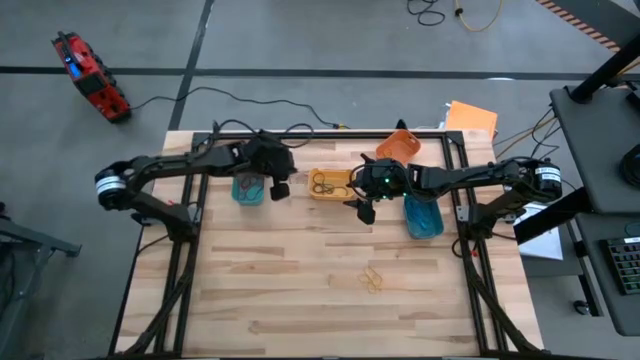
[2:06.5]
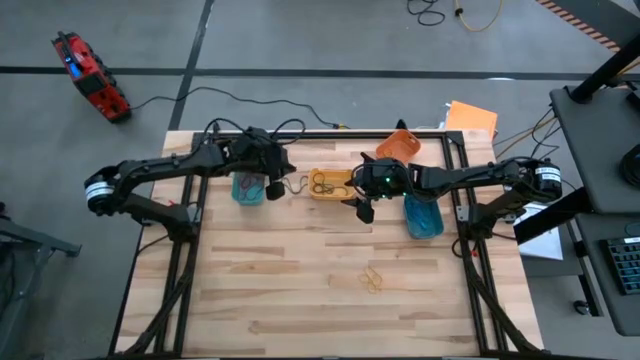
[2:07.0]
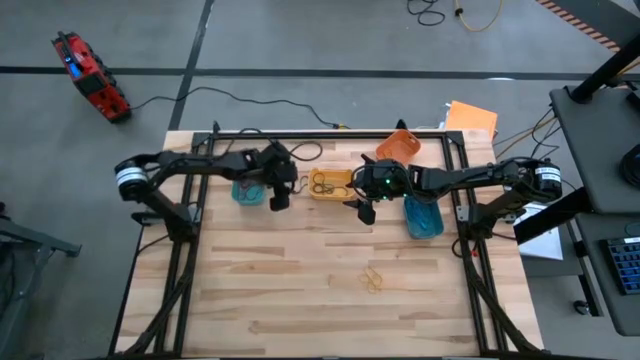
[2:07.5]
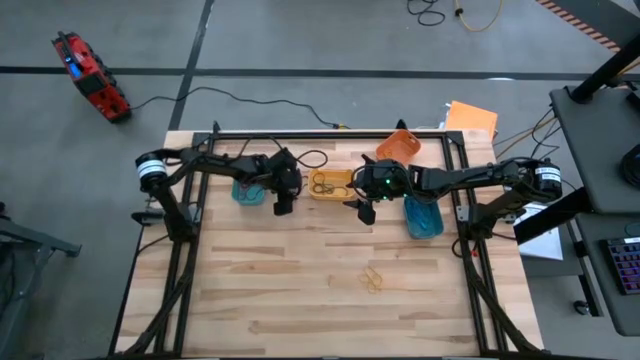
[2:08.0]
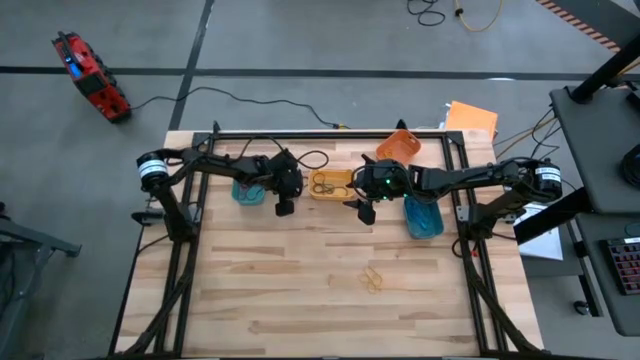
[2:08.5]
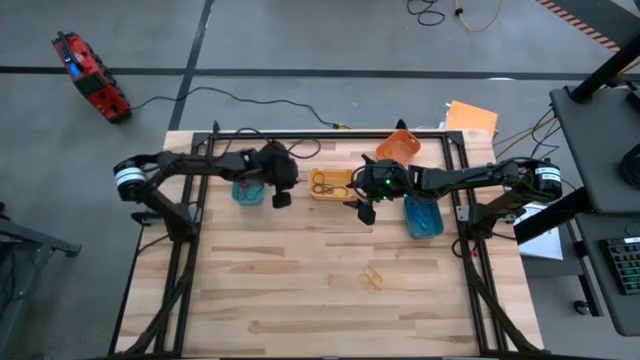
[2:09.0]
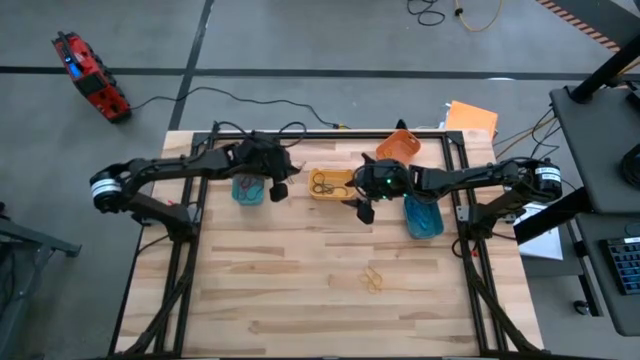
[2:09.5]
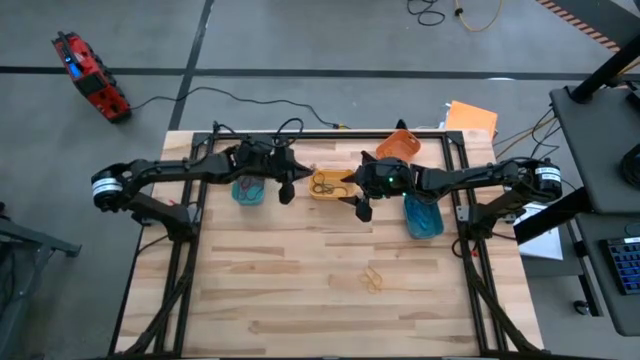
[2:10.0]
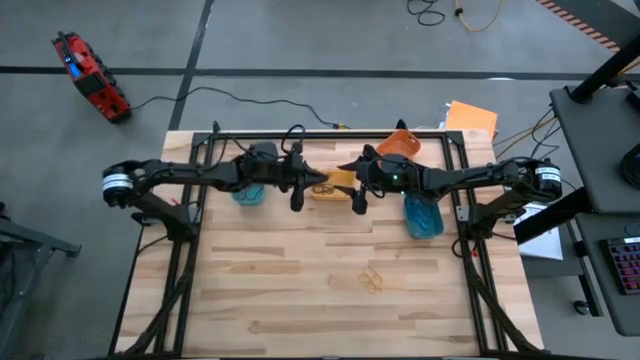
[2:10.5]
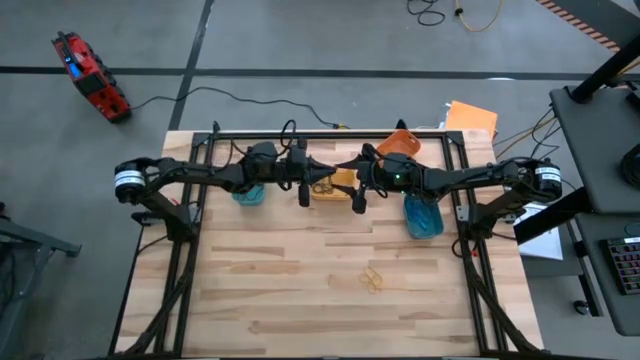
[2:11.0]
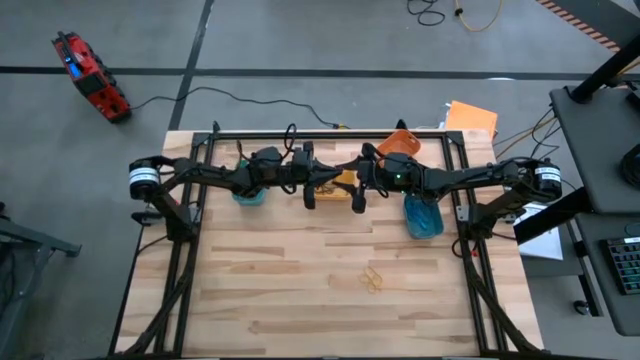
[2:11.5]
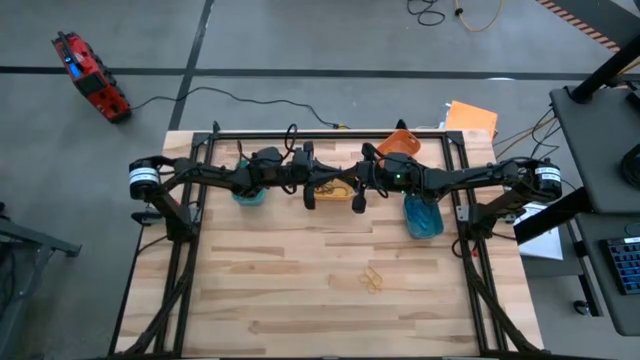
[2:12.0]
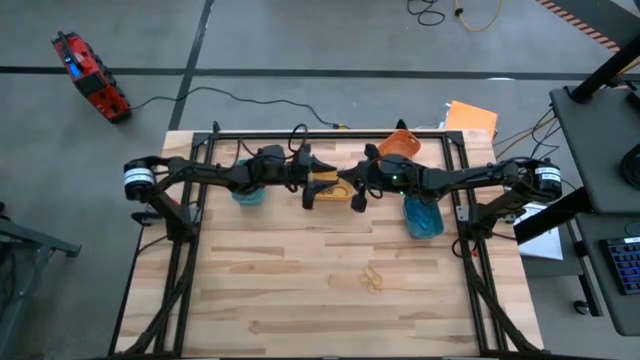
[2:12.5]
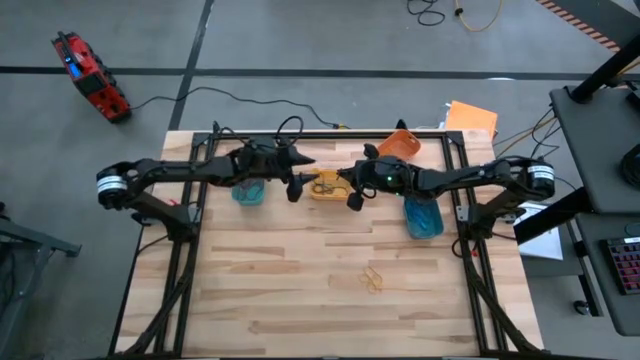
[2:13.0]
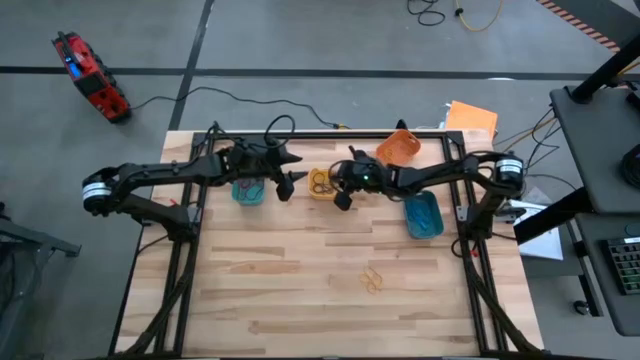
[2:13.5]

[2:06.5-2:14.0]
Task: Sort rubber bands into baskets
Put the black rubberband into the yellow bin

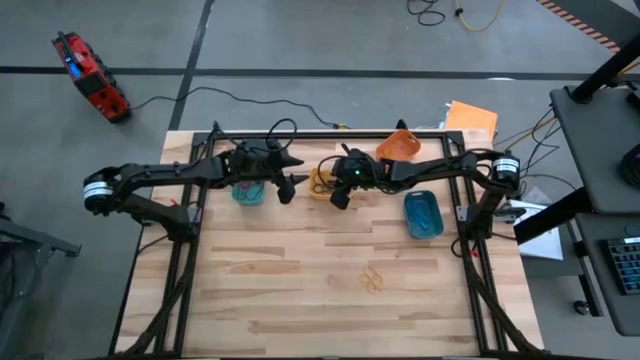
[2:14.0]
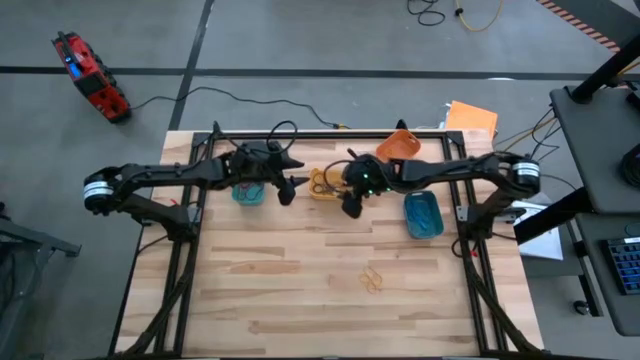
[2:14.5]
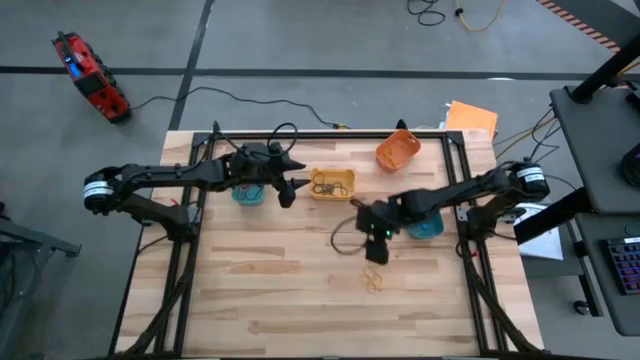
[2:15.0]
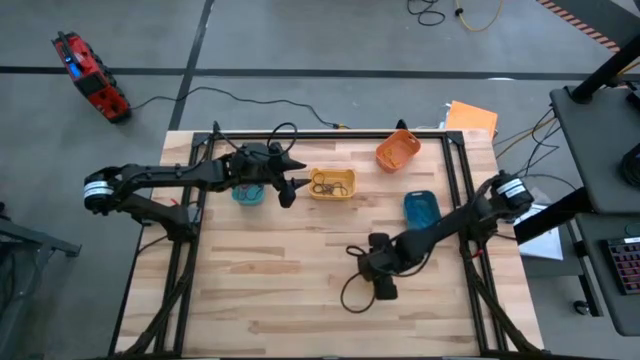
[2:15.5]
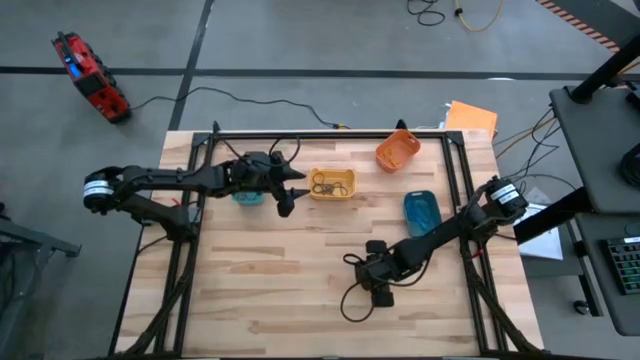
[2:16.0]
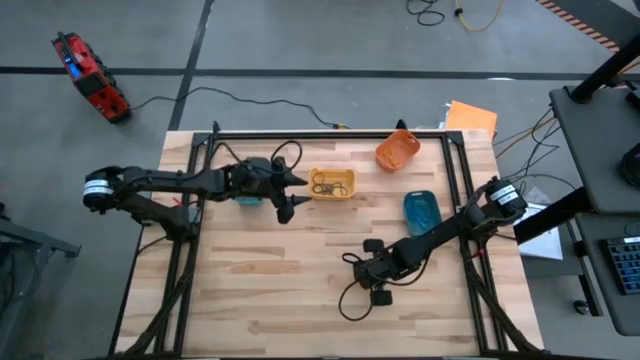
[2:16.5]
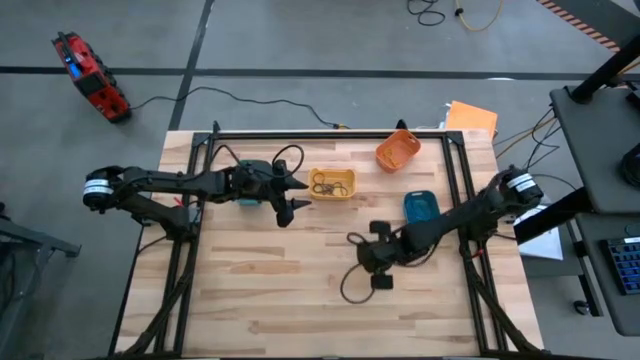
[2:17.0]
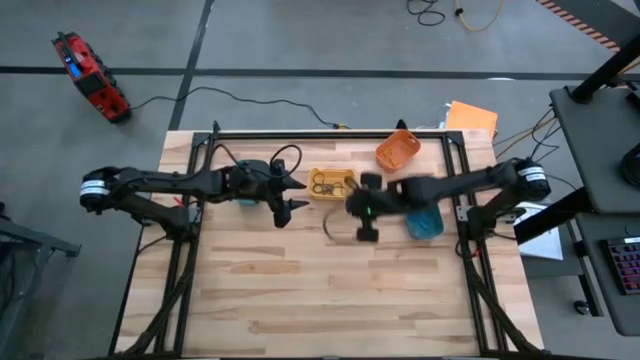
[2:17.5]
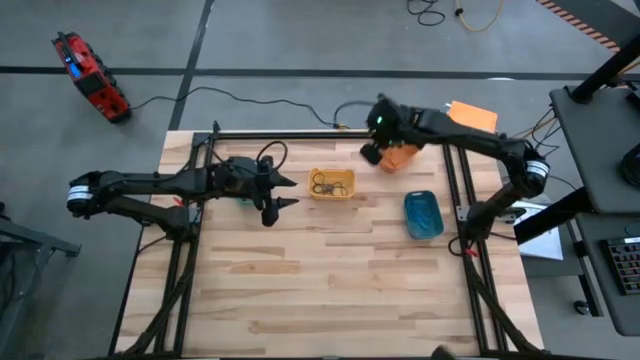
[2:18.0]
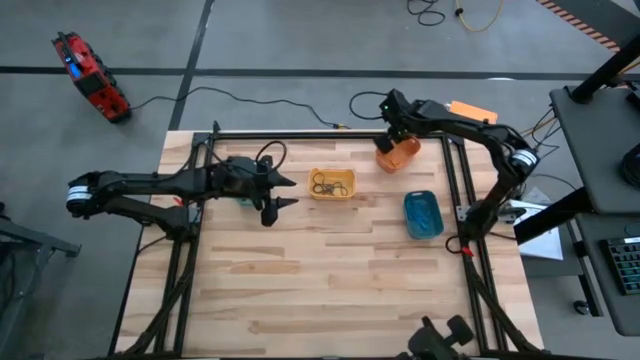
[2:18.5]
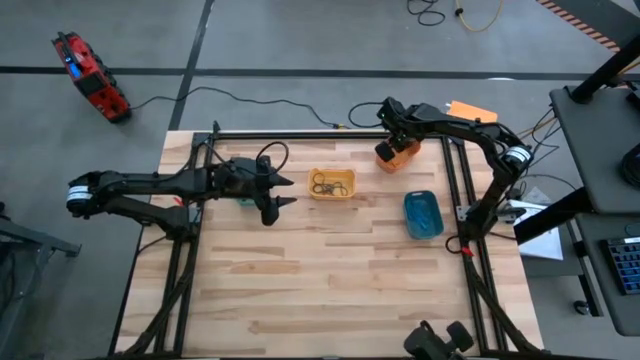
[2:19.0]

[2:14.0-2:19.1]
Put the yellow rubberband into the orange bin

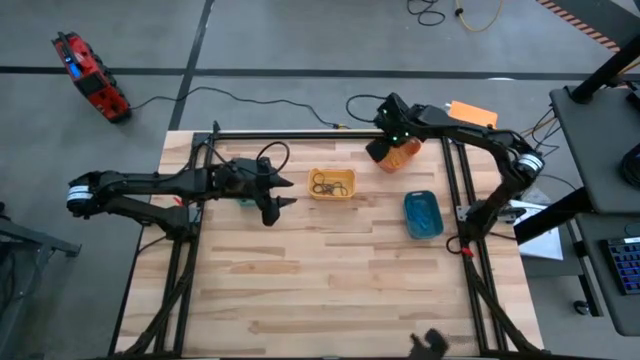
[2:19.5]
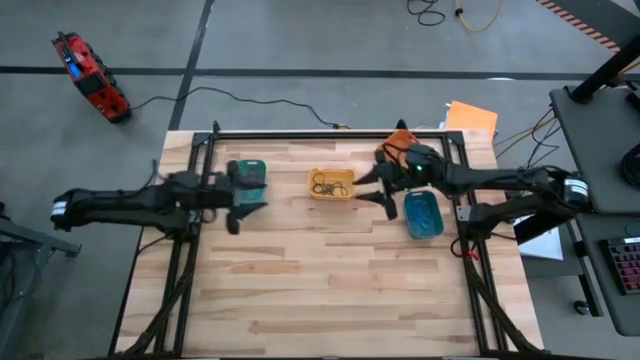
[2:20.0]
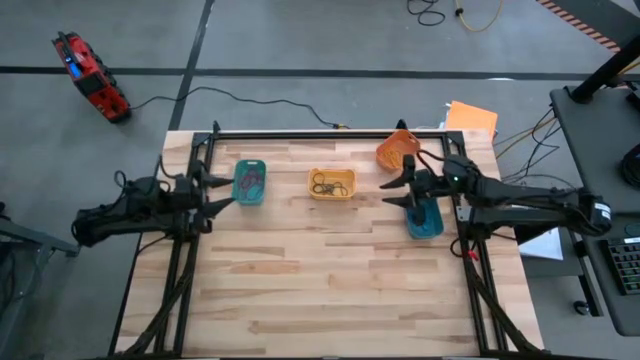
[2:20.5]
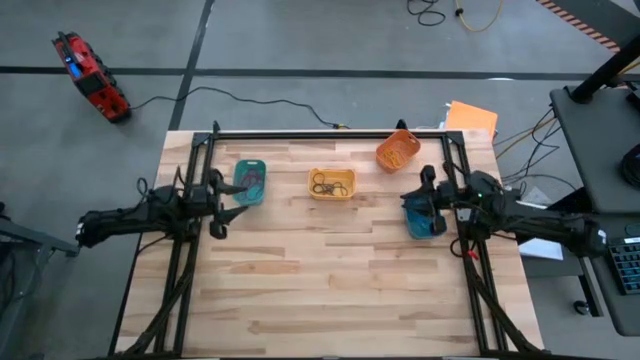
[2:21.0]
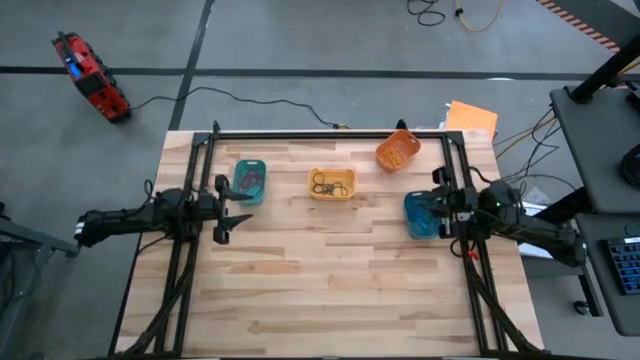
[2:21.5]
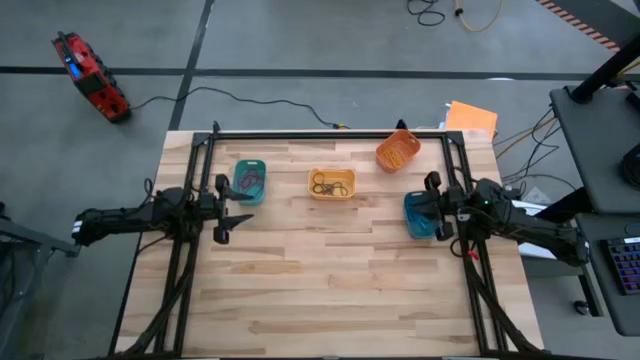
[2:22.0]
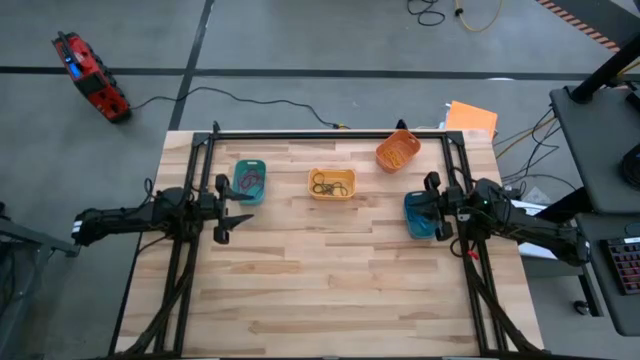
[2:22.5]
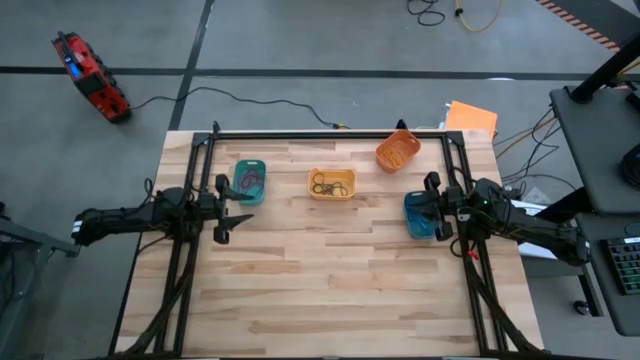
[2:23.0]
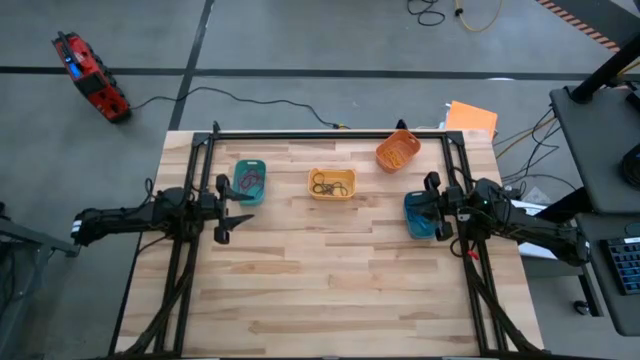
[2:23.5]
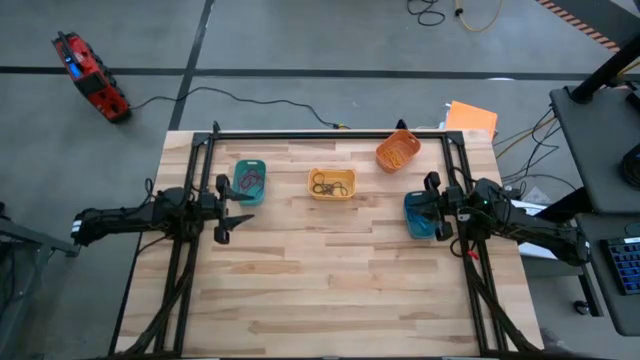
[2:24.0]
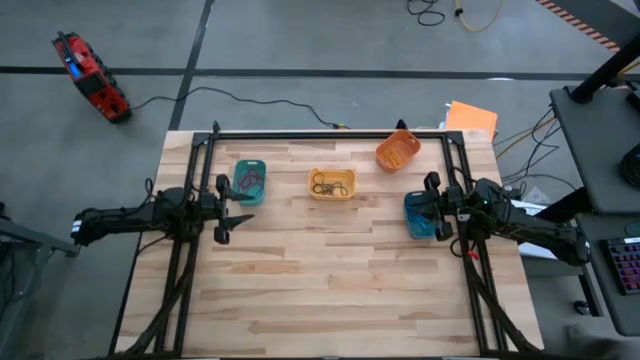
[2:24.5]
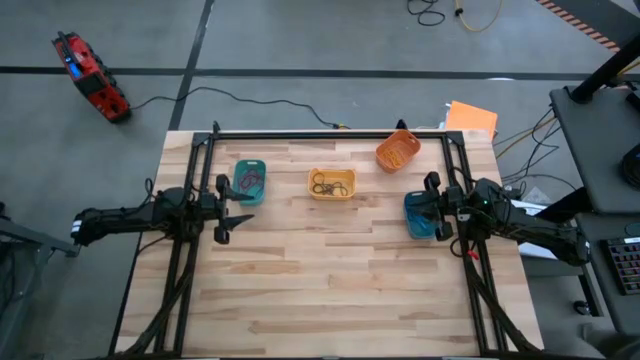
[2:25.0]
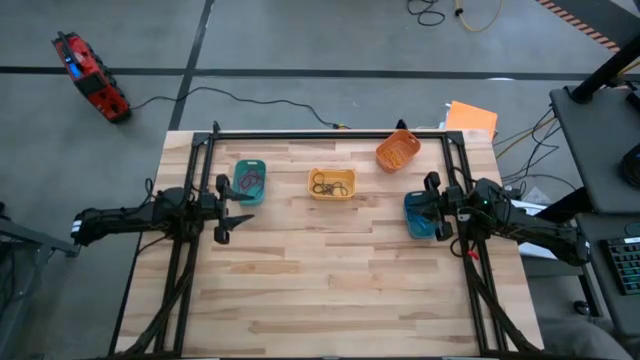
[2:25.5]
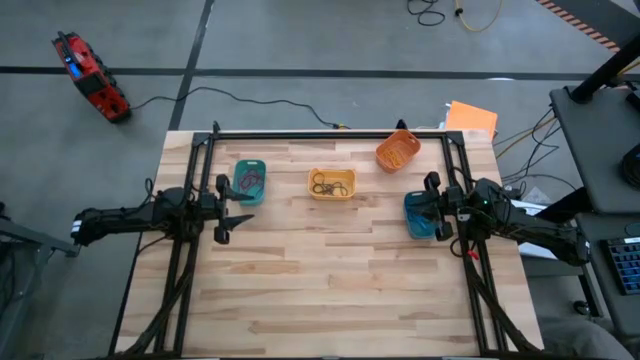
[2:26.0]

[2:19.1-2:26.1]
Return to Home Position
